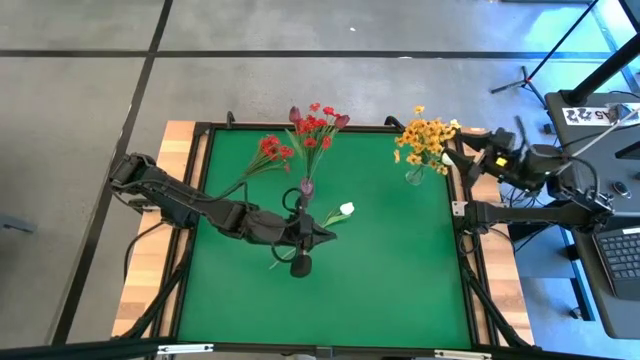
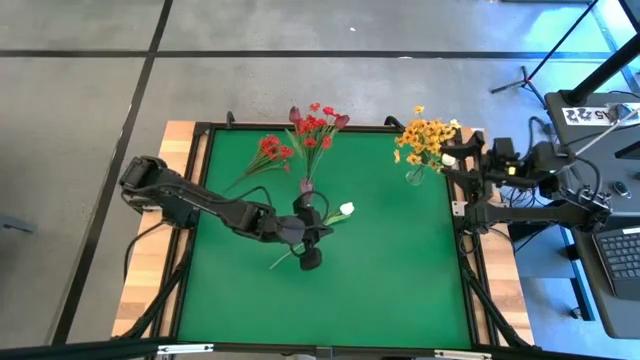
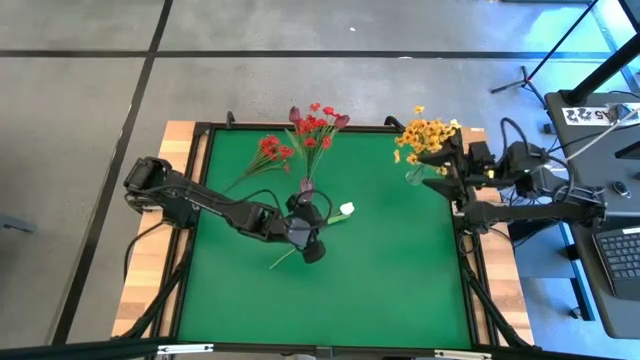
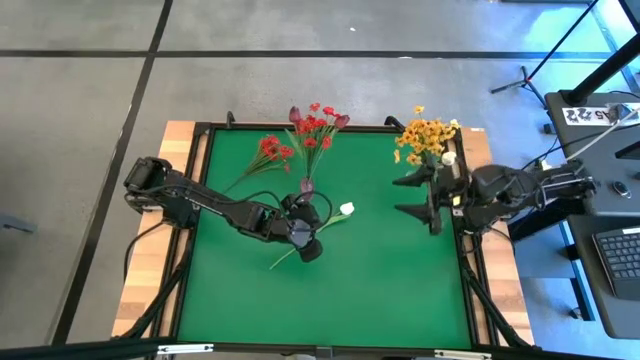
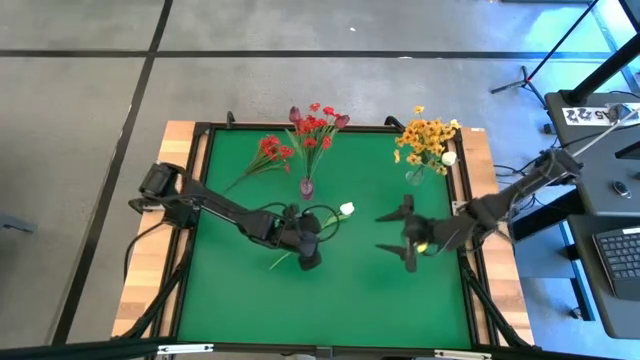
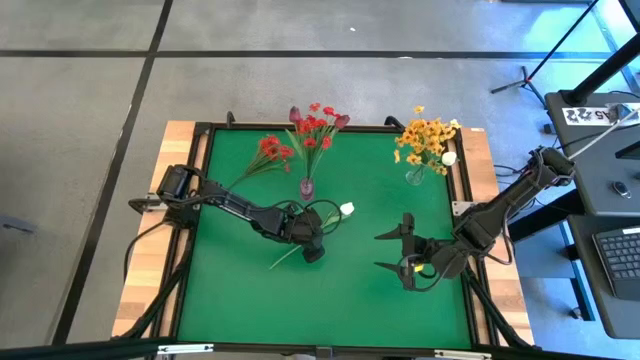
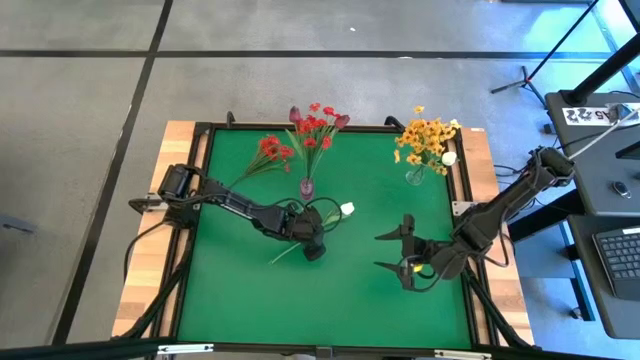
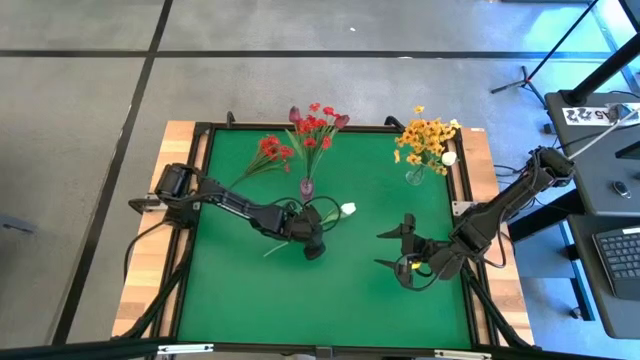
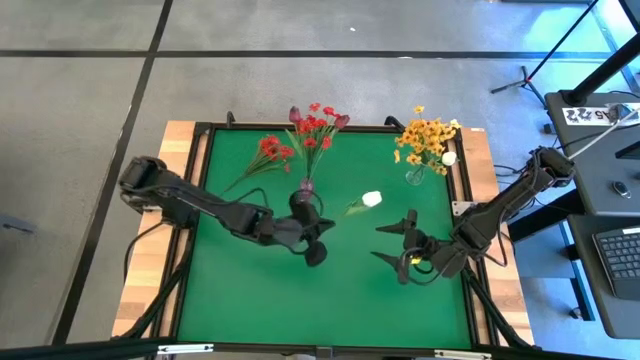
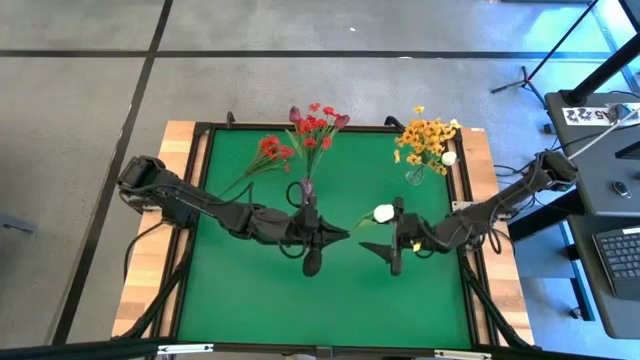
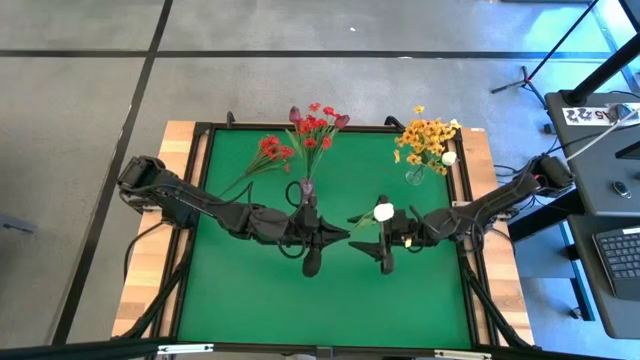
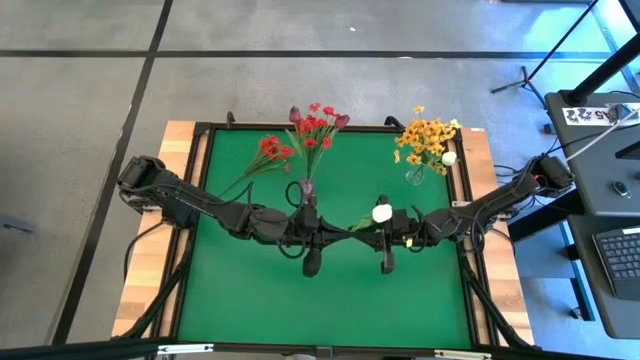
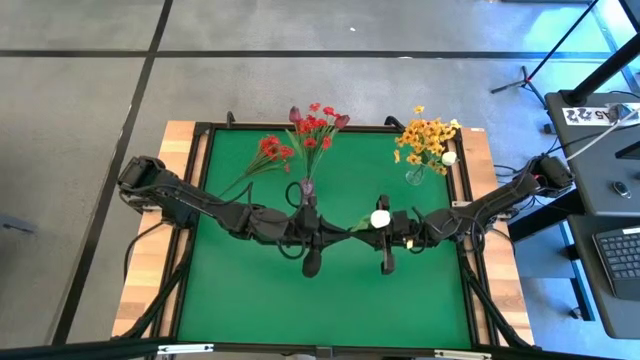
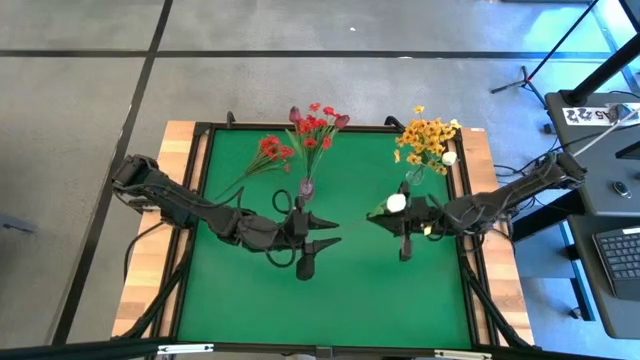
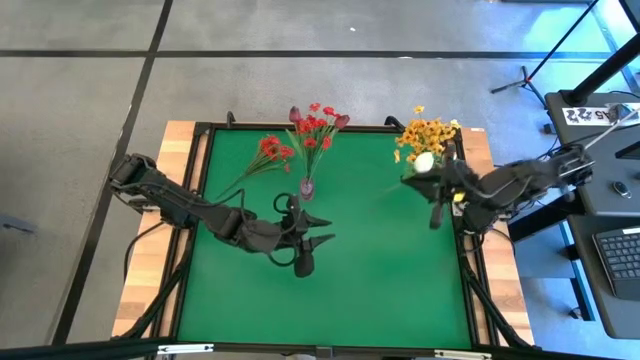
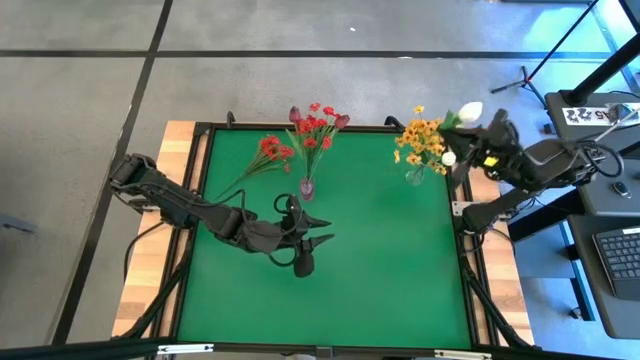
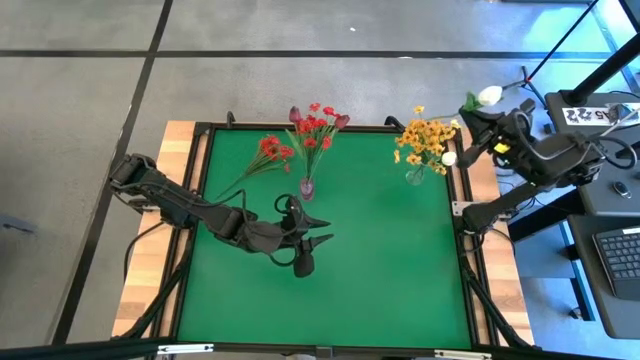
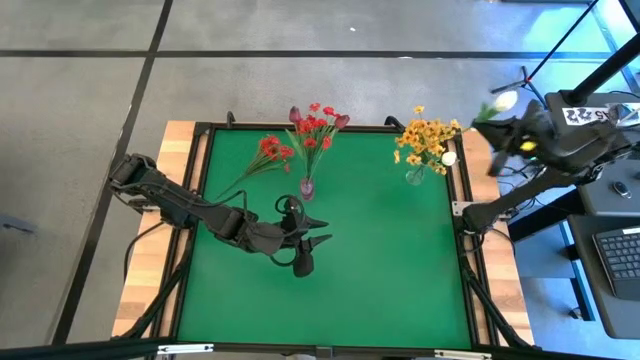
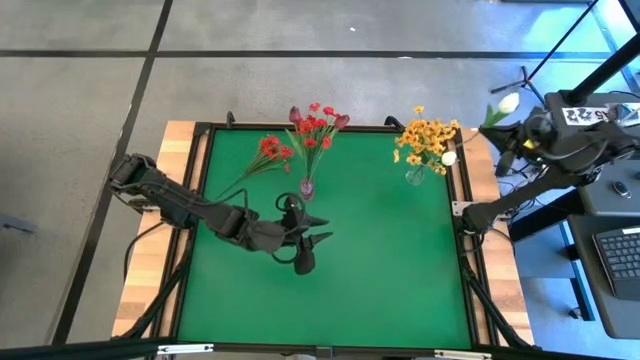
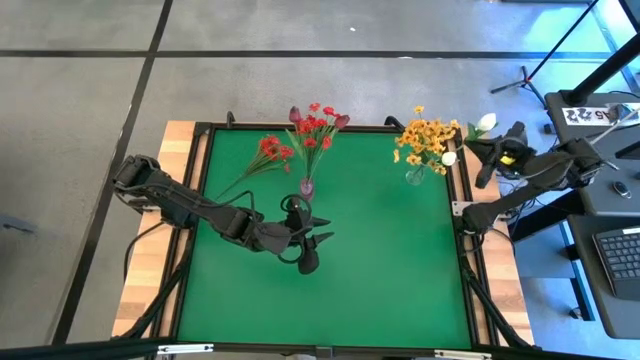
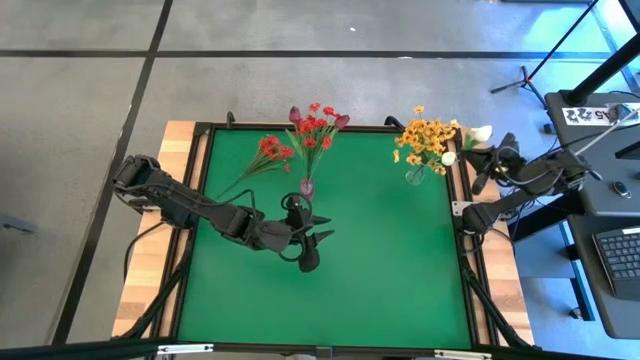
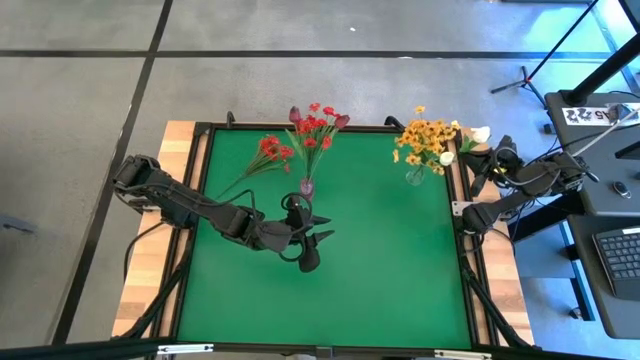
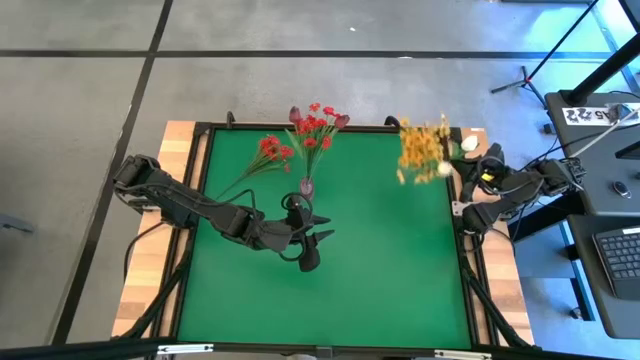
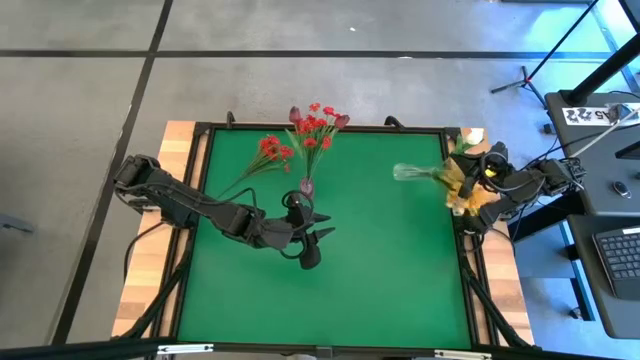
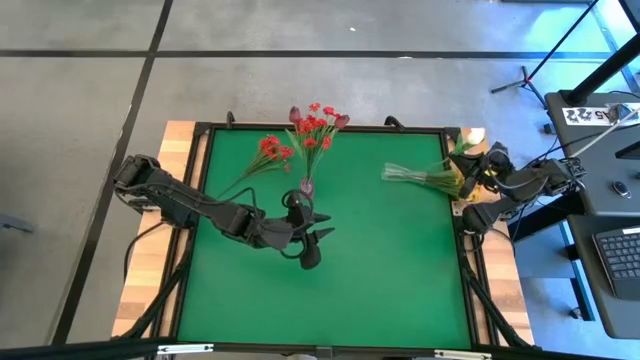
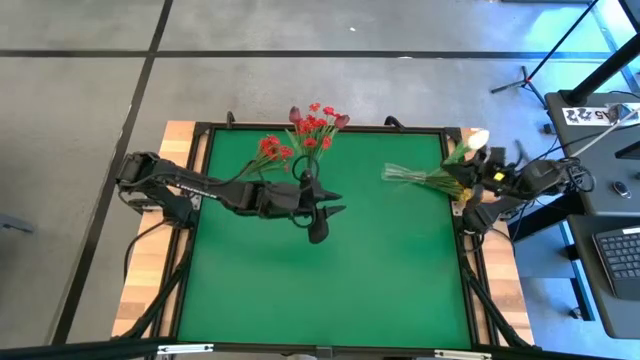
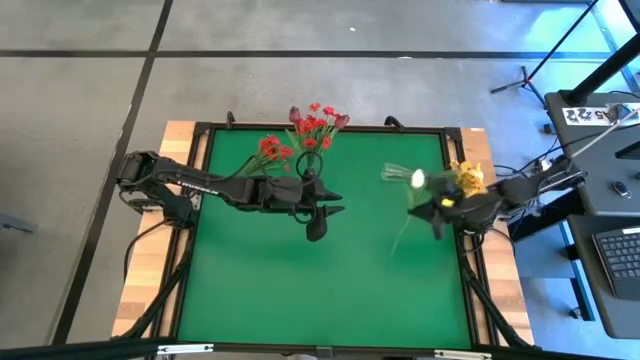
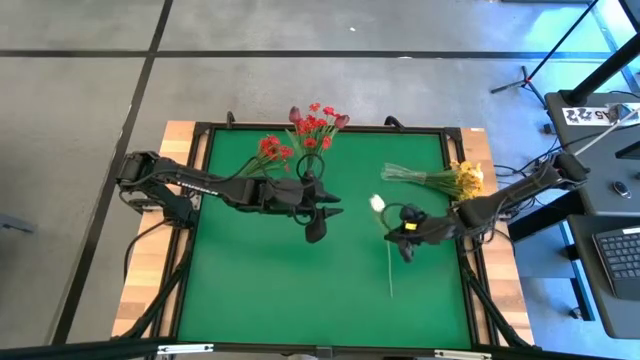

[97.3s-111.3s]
Task: Sort flowers into vase by color
Put the white tulip into the transparent vase

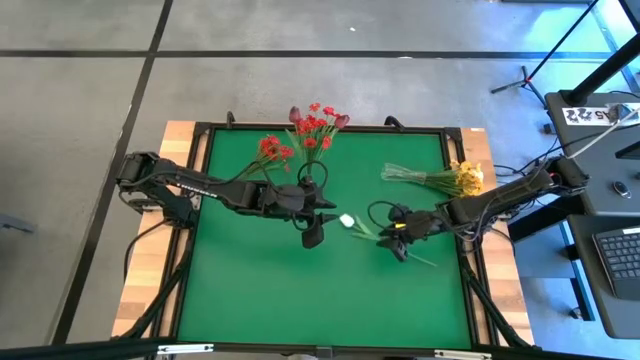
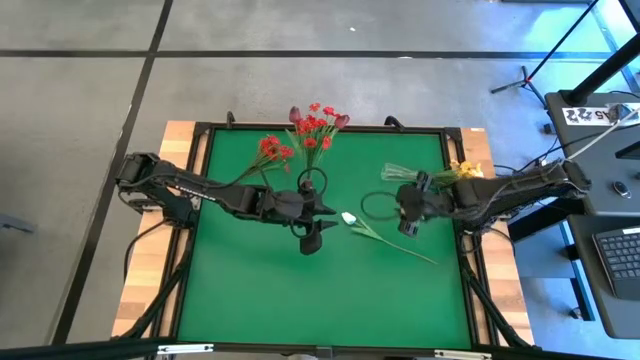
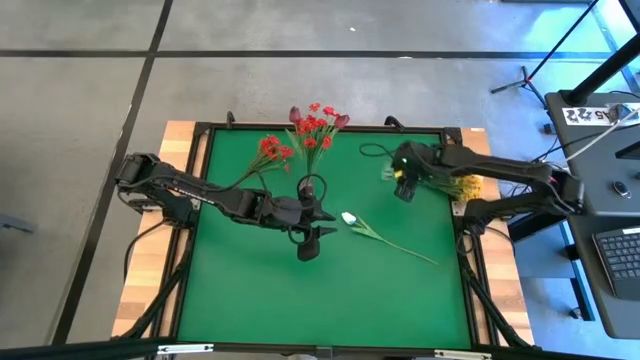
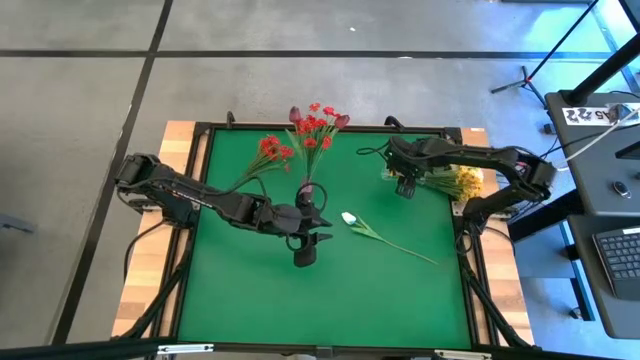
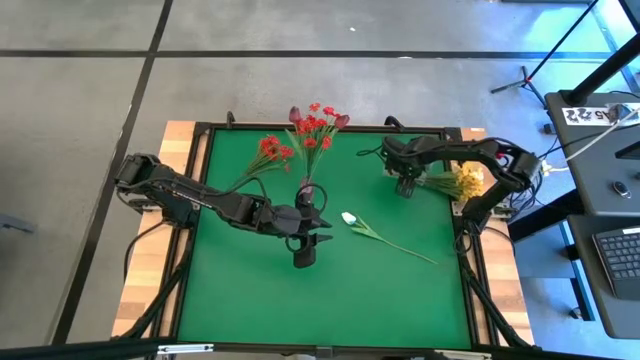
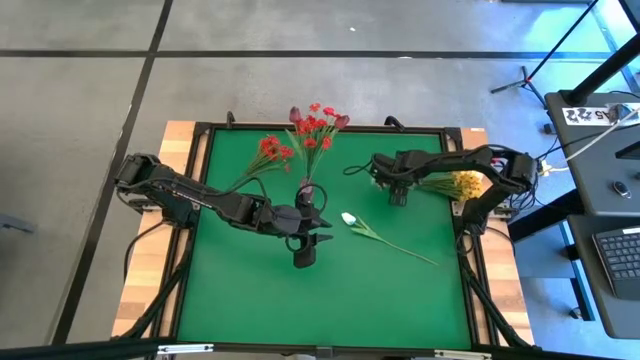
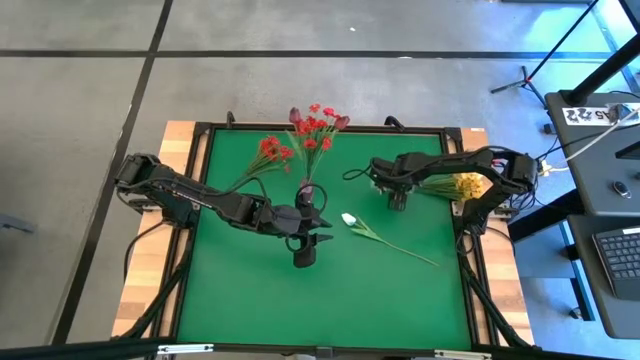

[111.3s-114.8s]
Adjust the transparent vase

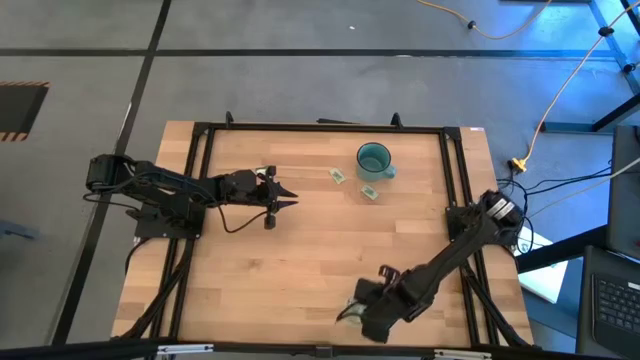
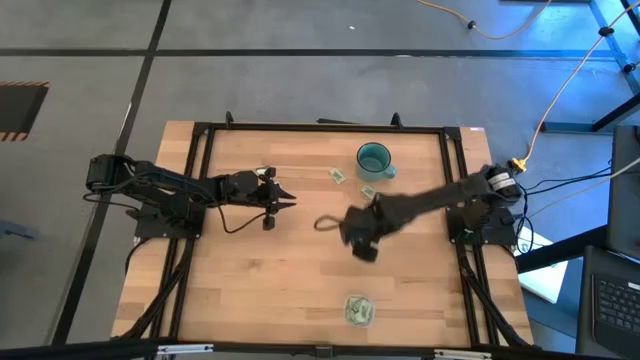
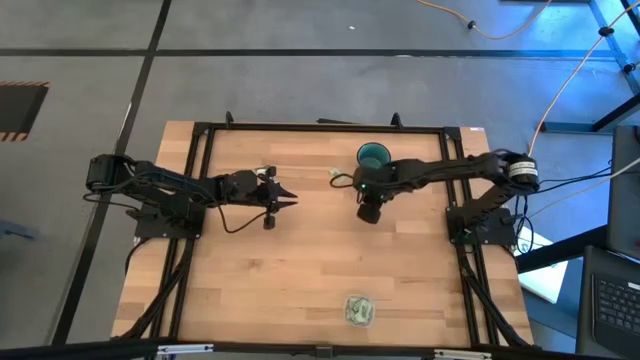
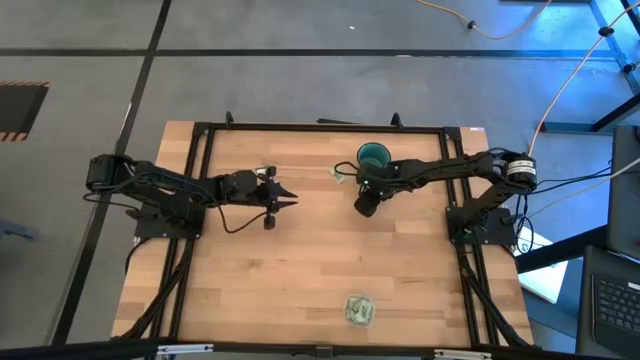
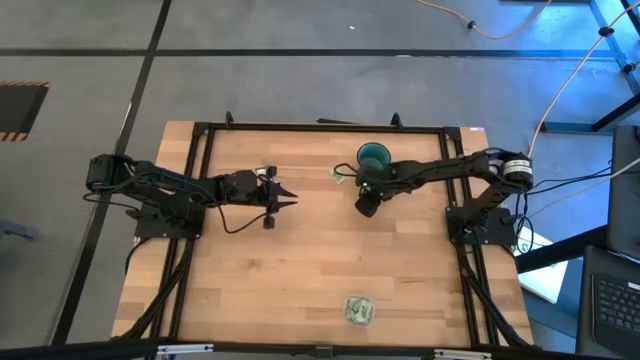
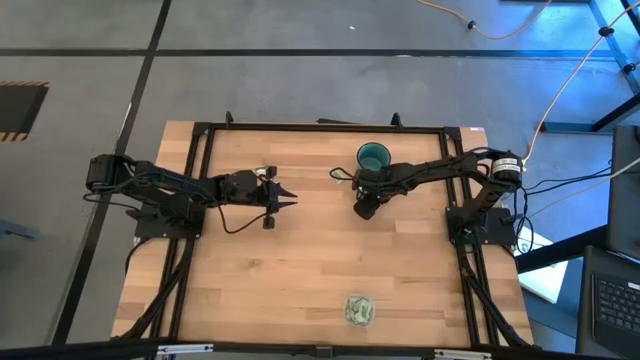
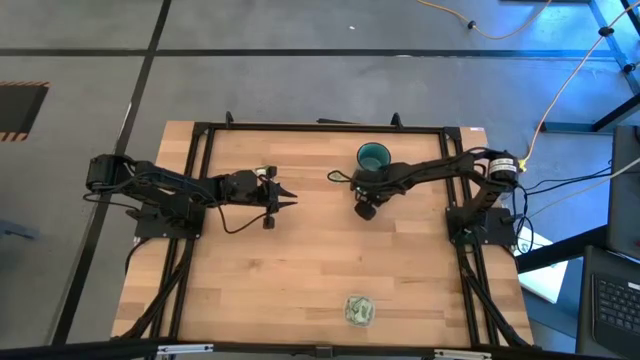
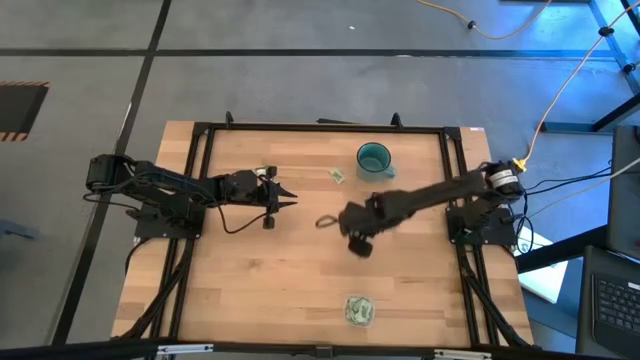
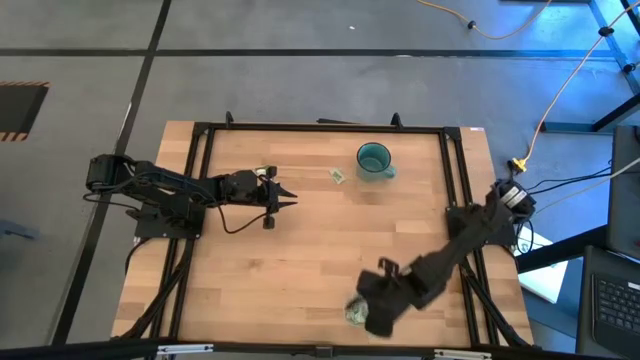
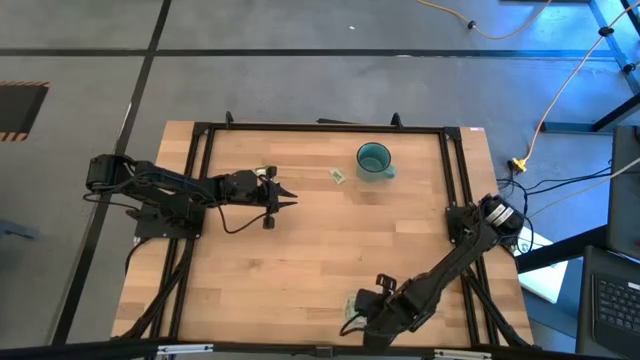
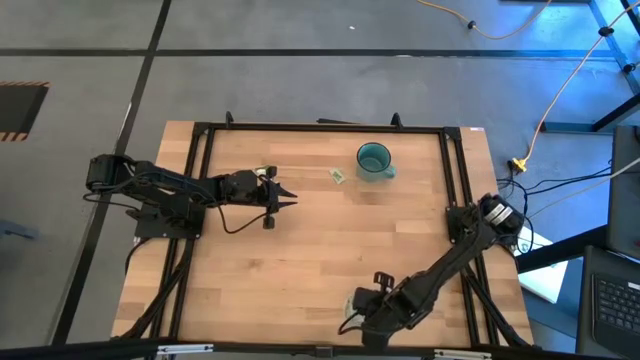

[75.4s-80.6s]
Task: Pick and place items into bin
Put the light green stevia packet into the transparent bin
